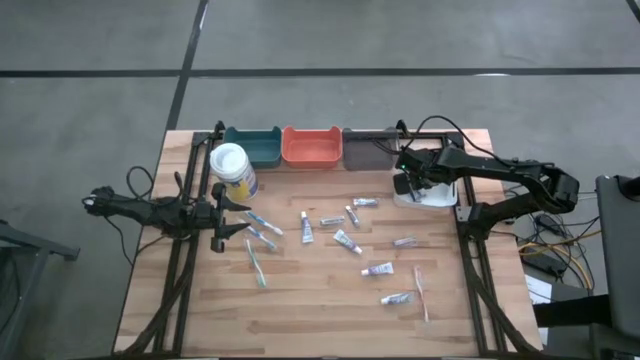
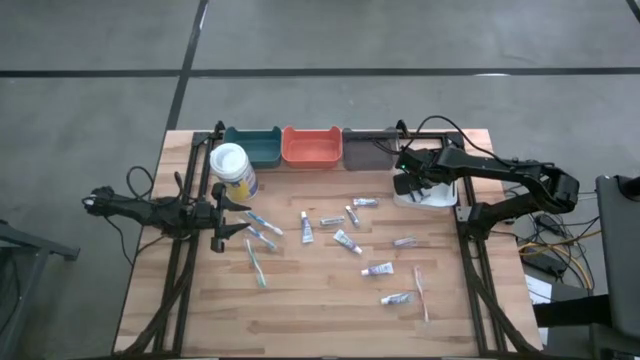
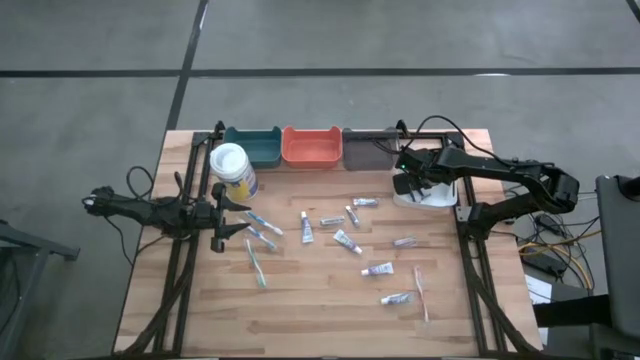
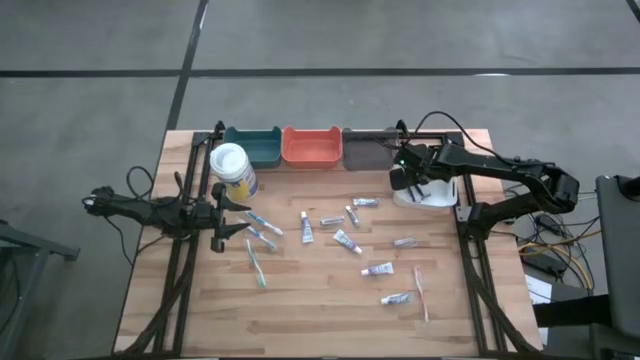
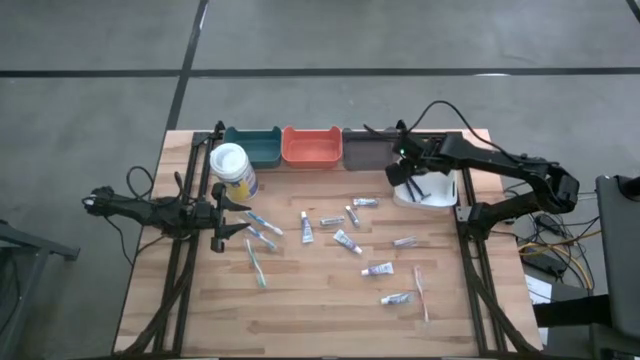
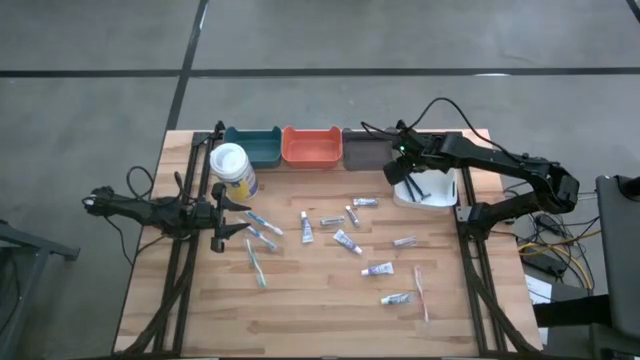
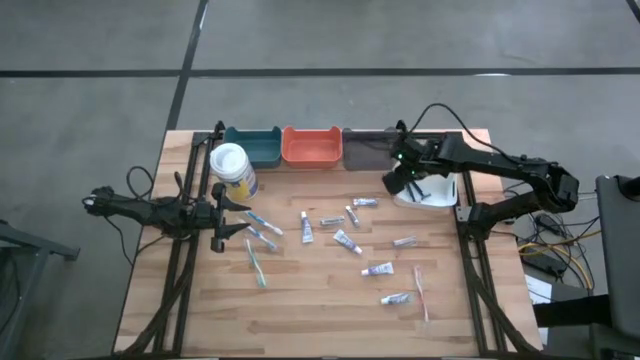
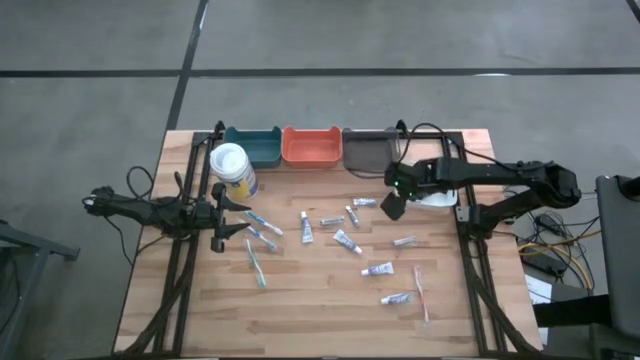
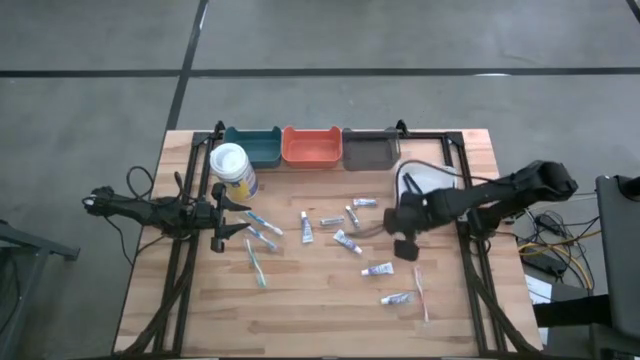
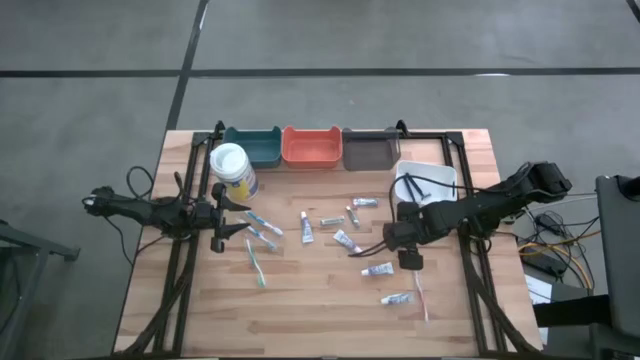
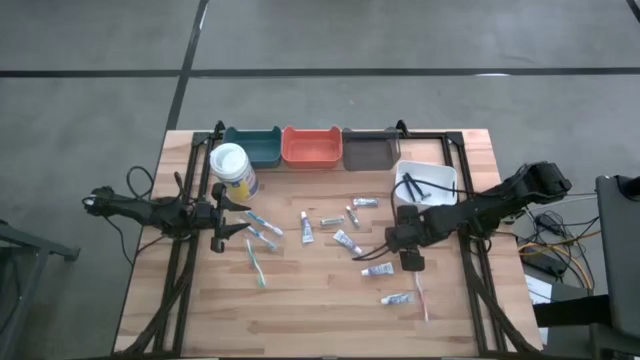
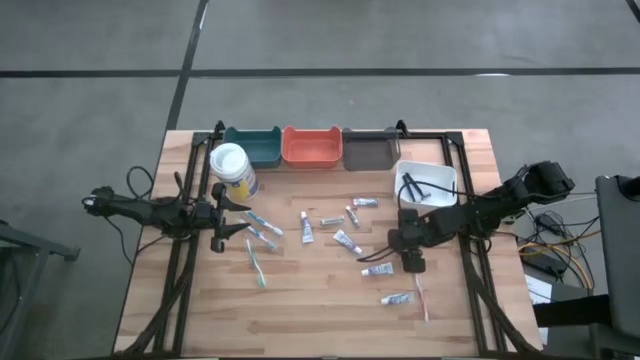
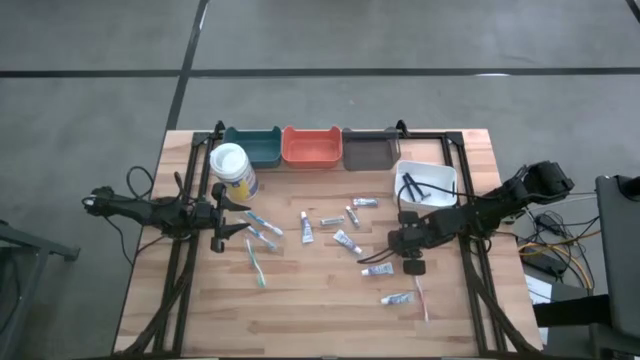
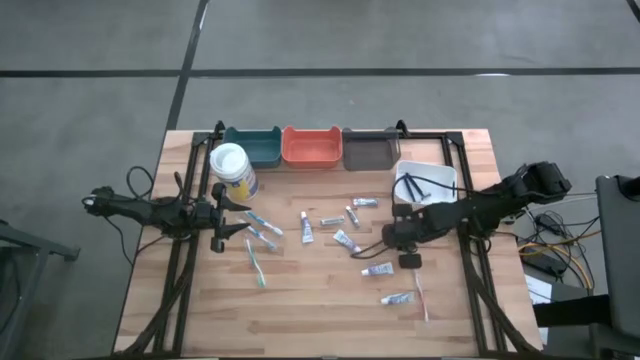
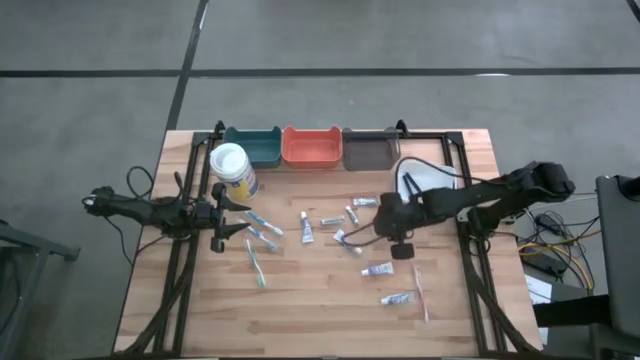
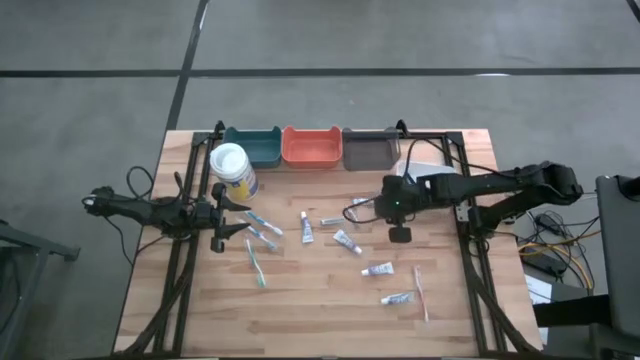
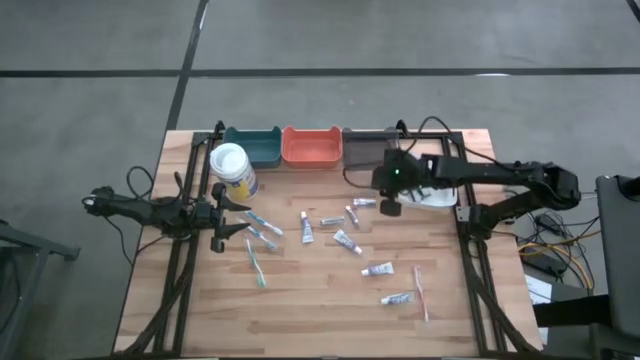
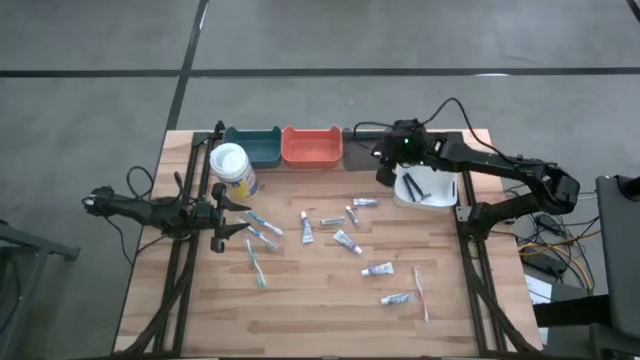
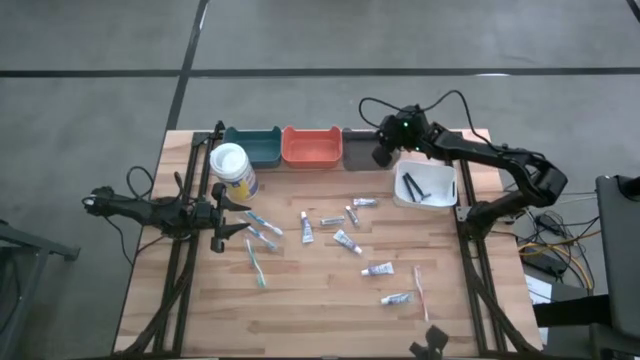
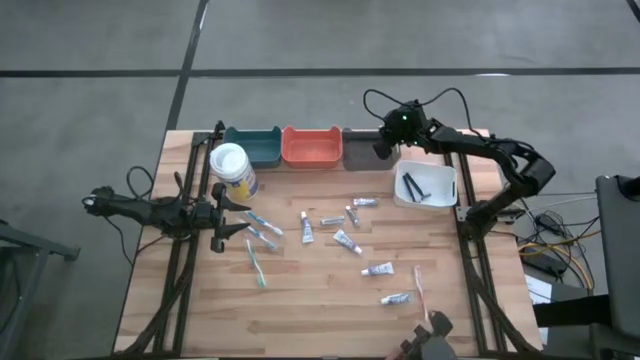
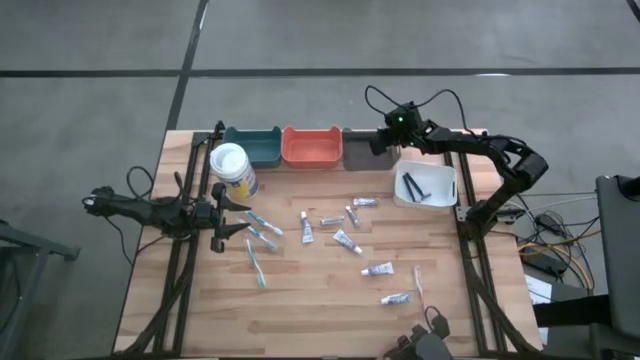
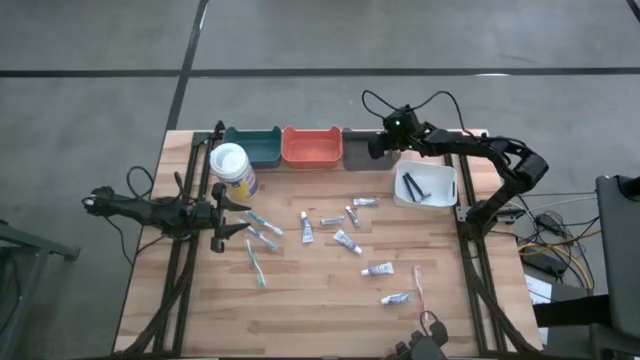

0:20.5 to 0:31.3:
Task: Pick & Place Travel size toiletries
Put the nail cutter into the black bin

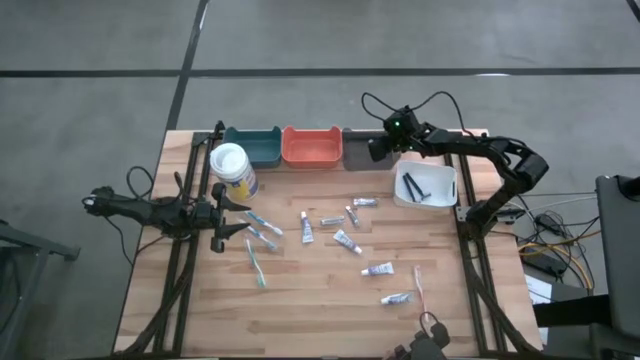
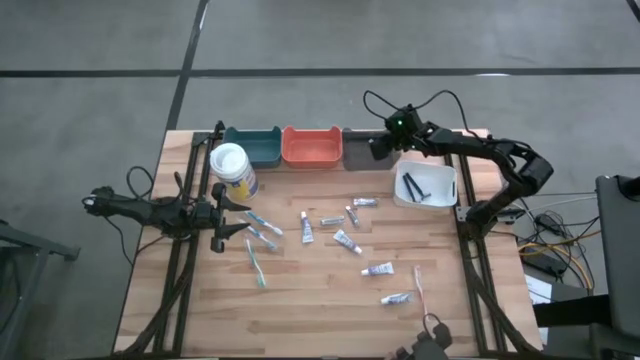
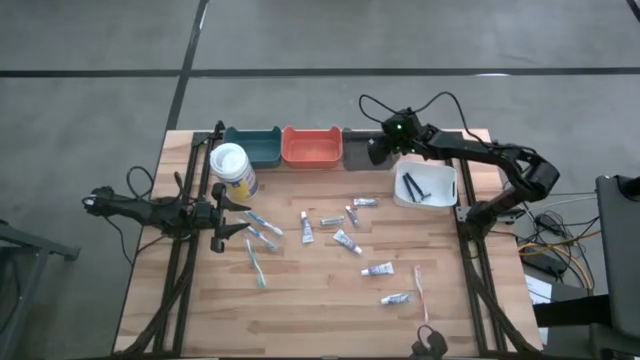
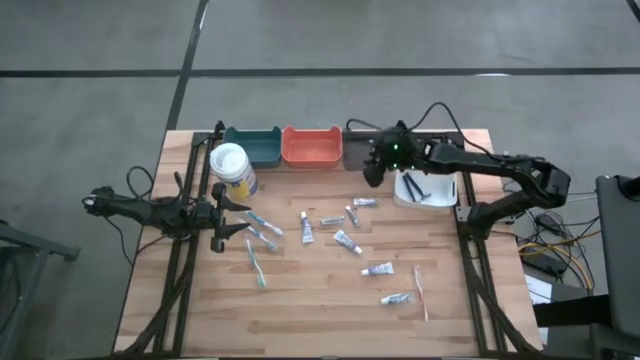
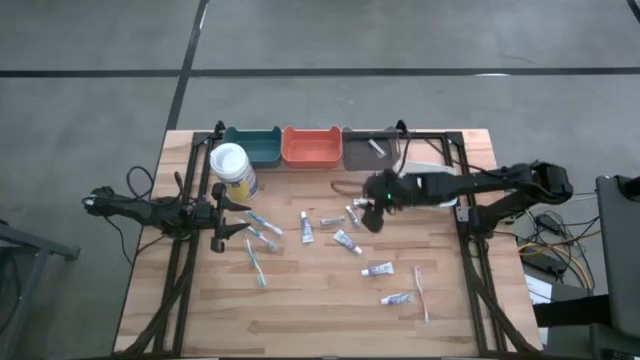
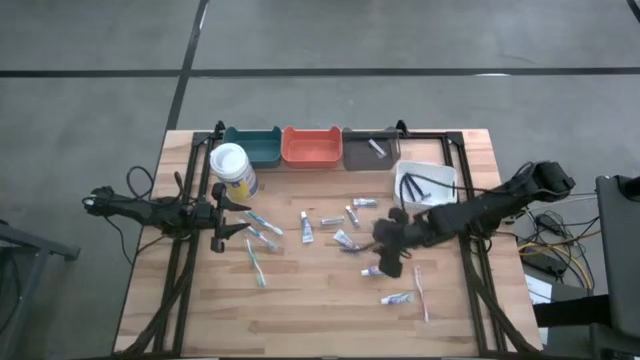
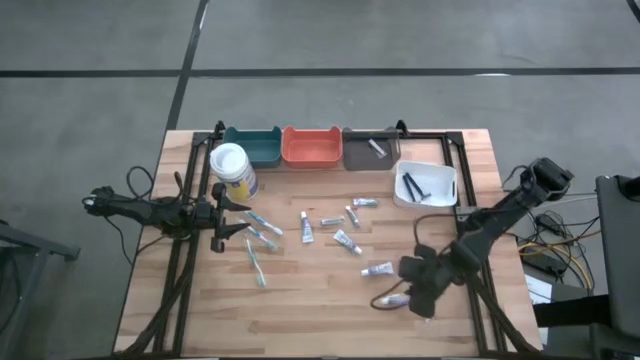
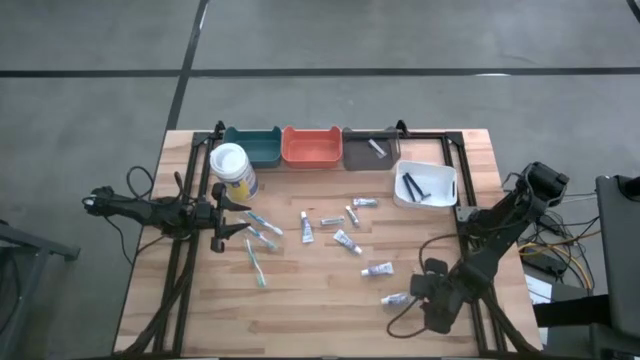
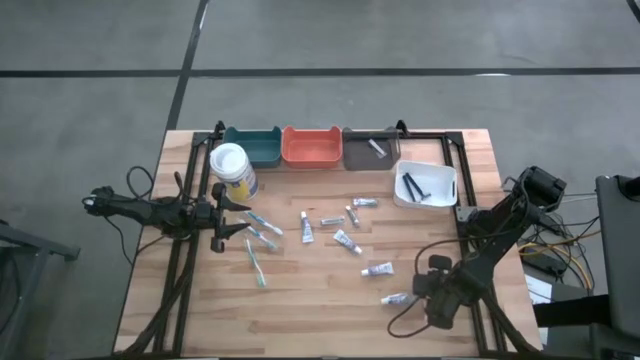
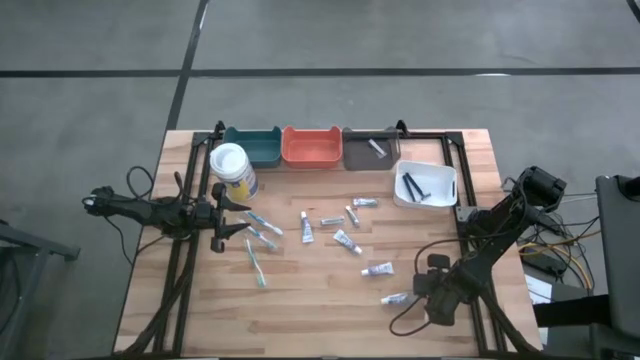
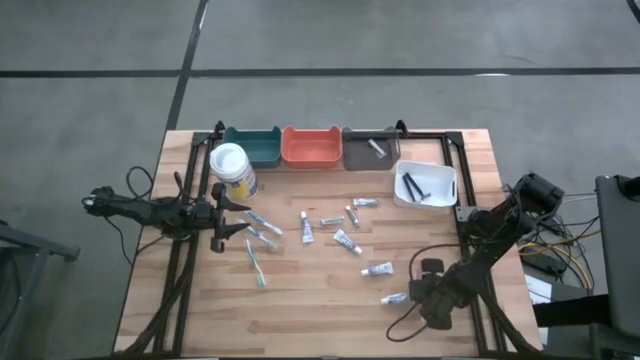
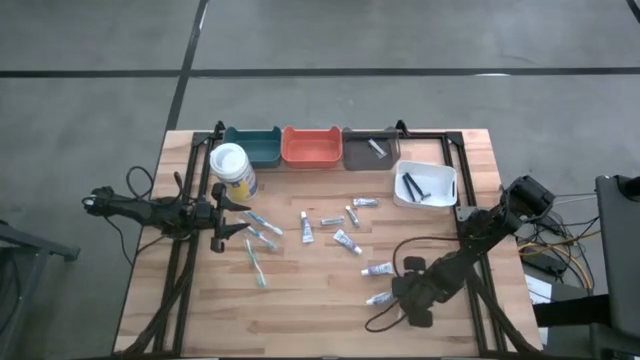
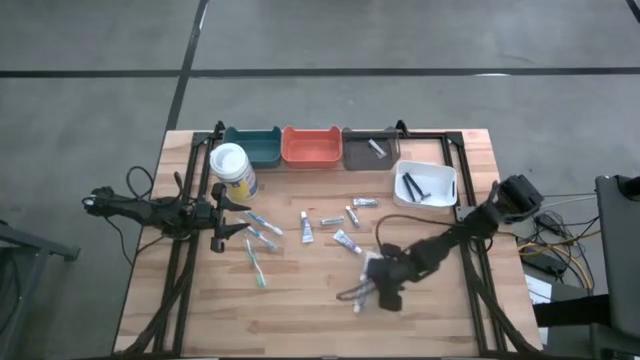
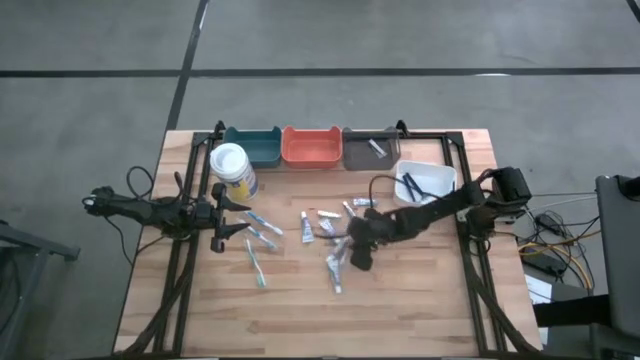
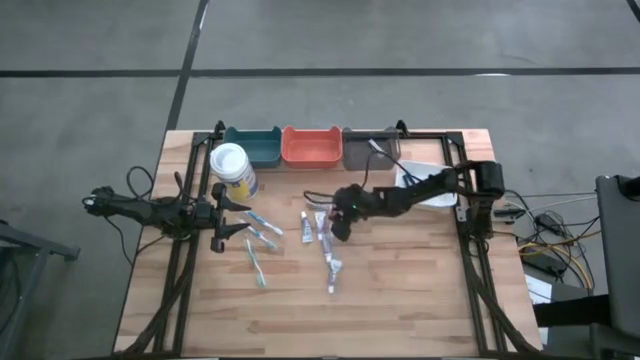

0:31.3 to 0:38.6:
Move the orange toothbrush to the top middle of the table

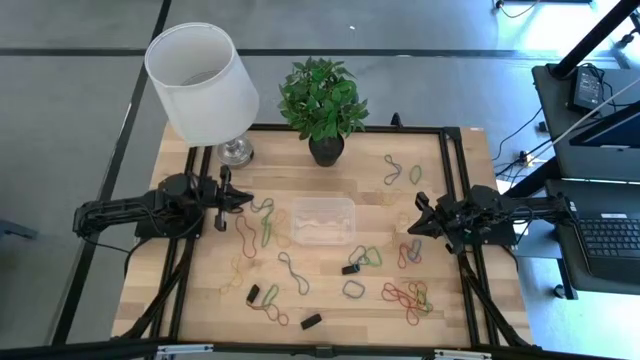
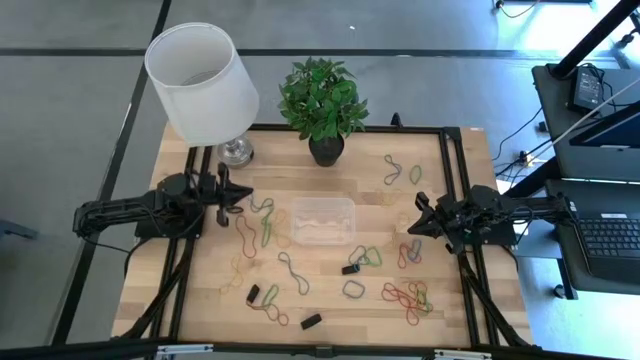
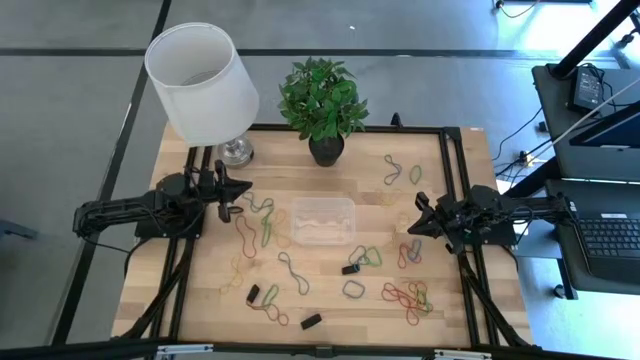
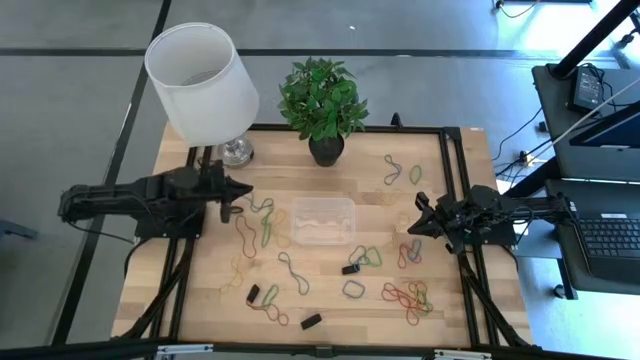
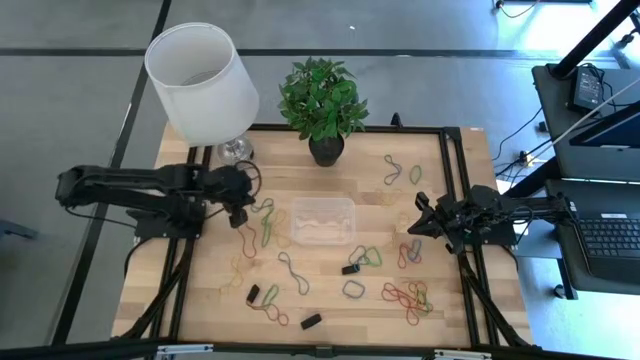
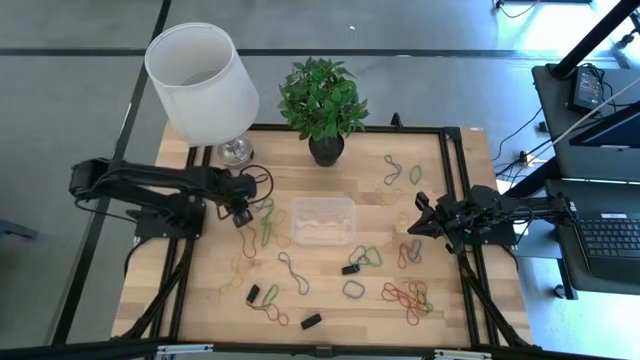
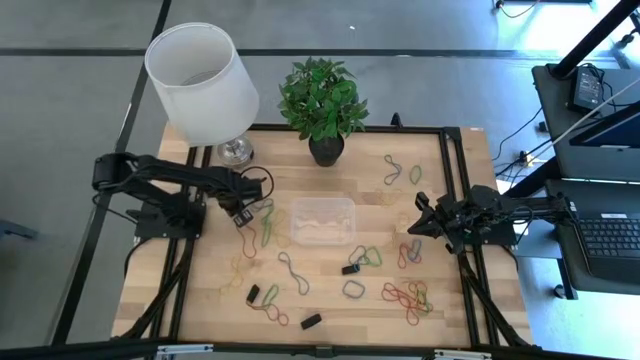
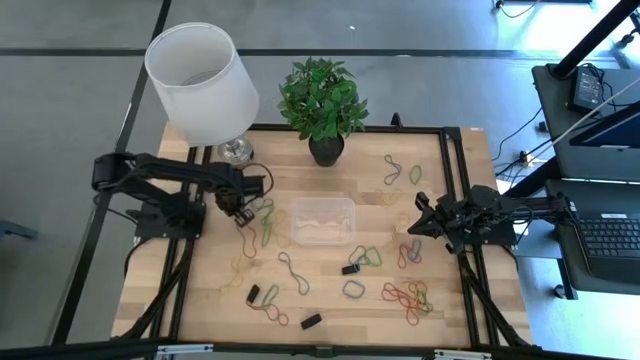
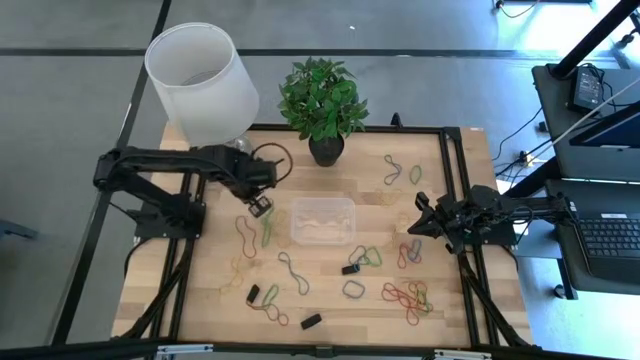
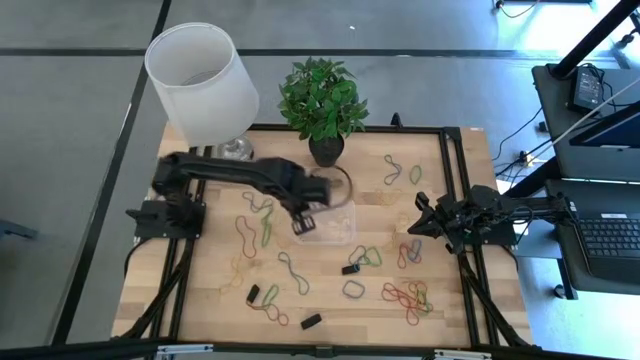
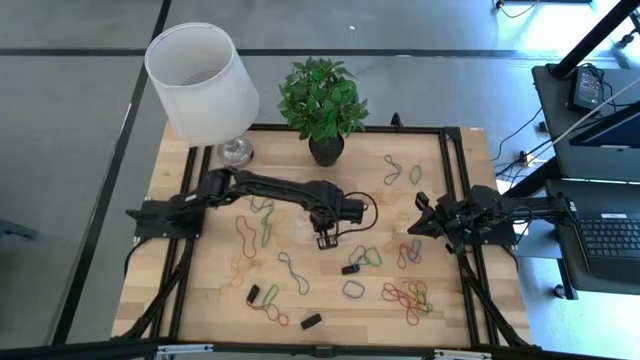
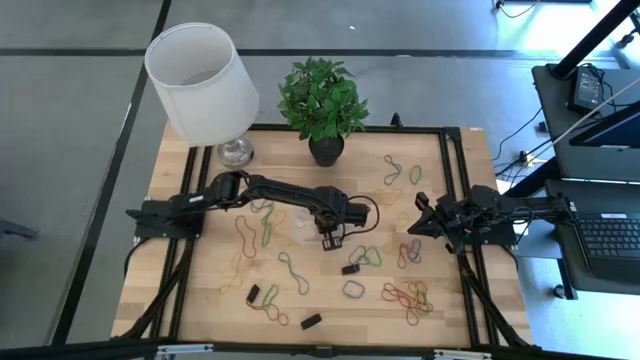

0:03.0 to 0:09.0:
Task: Pick and place rubber bands into bin
Put the black rubber band into the transparent container
